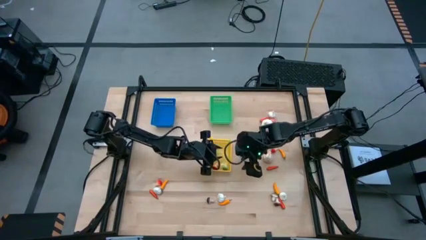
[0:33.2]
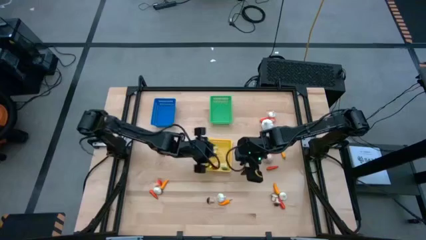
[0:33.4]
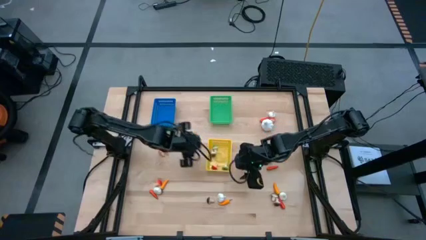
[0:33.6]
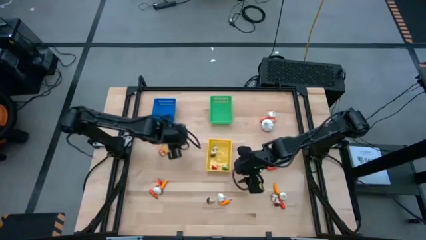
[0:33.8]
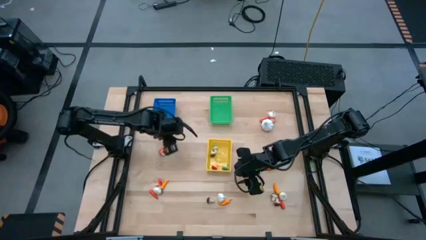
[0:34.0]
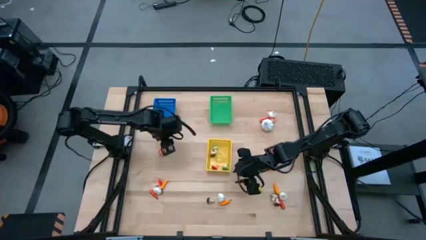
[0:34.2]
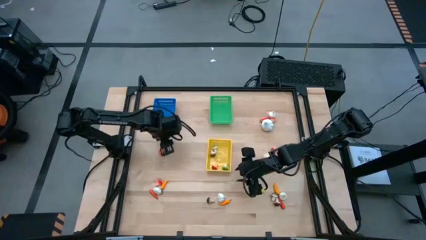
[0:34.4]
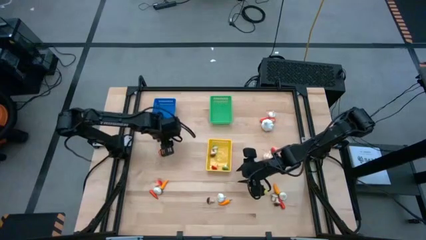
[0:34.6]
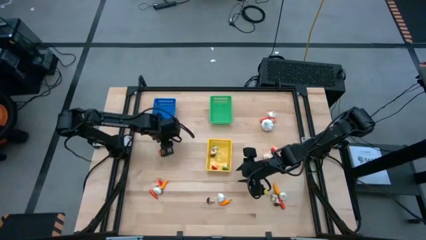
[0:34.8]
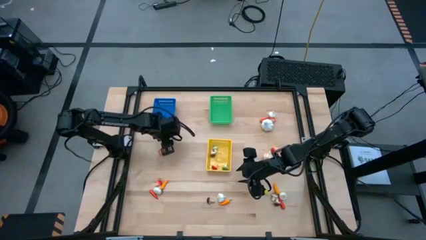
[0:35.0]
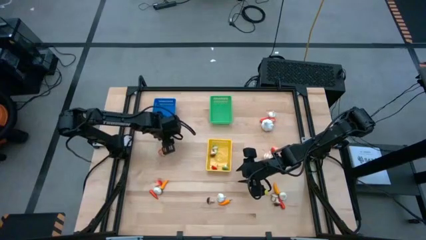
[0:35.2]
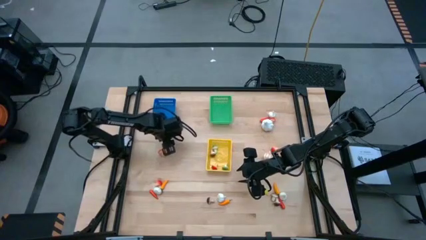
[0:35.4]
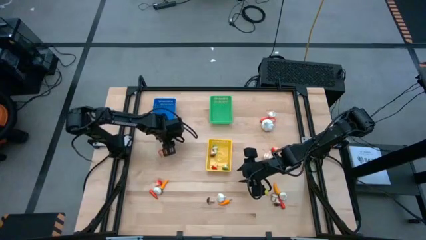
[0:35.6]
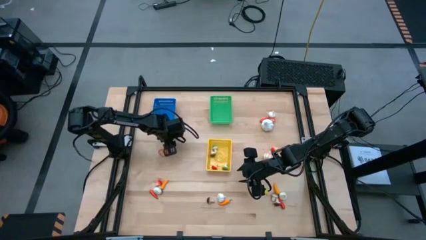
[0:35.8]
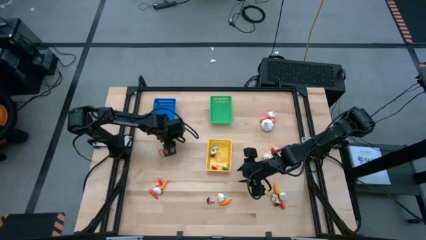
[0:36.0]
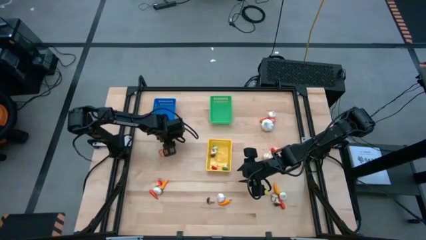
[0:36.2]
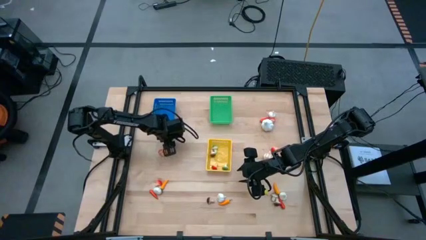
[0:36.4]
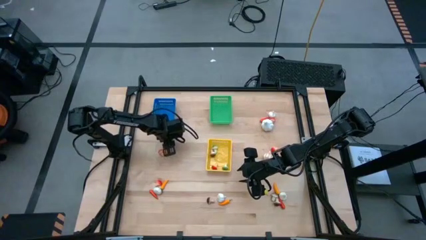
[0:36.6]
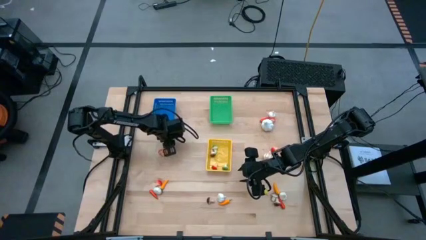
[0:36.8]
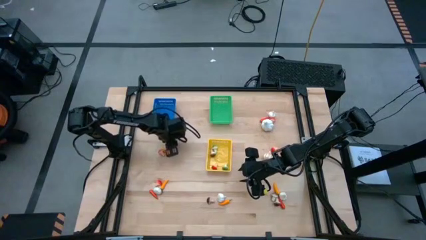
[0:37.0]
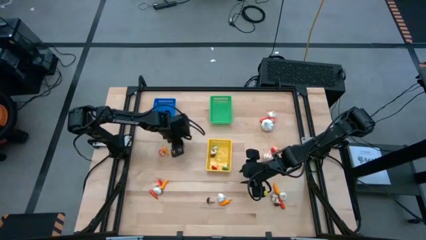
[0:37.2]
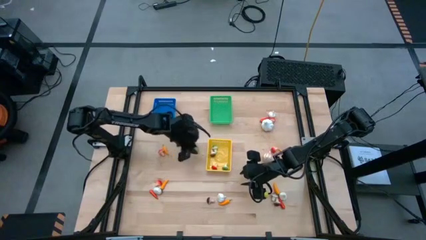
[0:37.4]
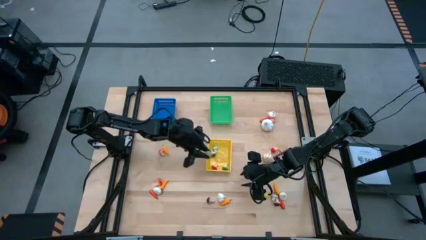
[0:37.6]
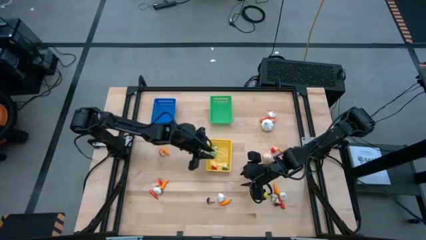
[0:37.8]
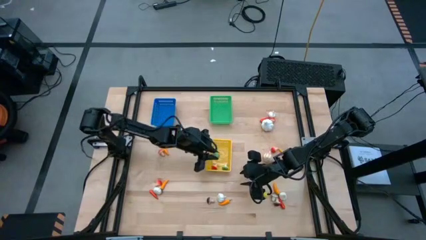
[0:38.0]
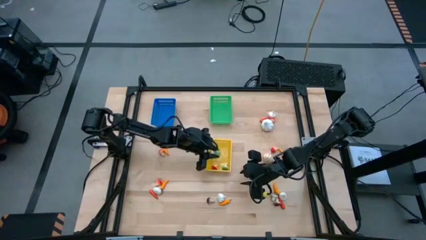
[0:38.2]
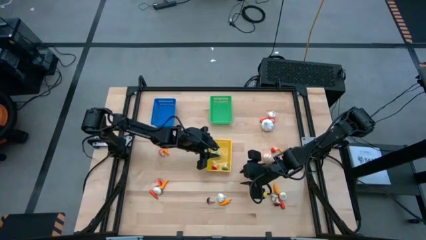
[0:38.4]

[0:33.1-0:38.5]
Task: Sort produce into baskets
Put the green mushroom into the yellow bin

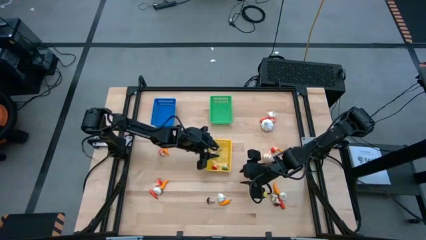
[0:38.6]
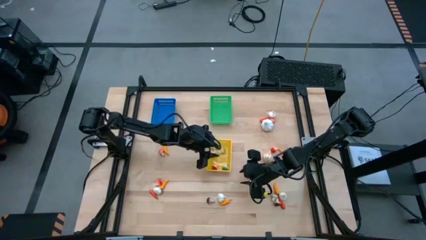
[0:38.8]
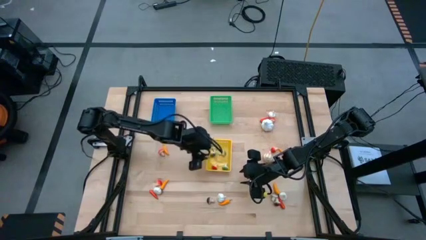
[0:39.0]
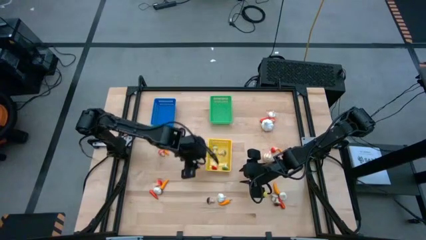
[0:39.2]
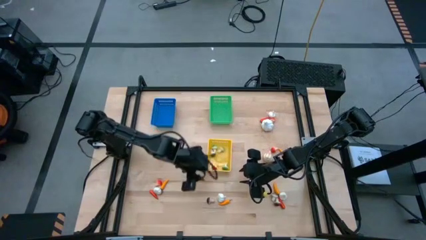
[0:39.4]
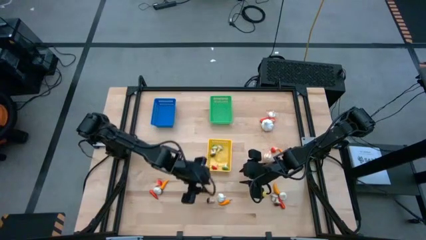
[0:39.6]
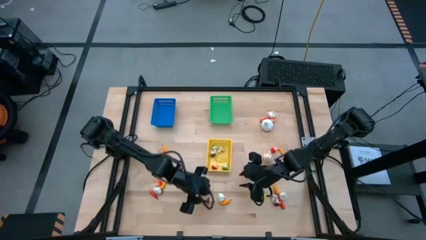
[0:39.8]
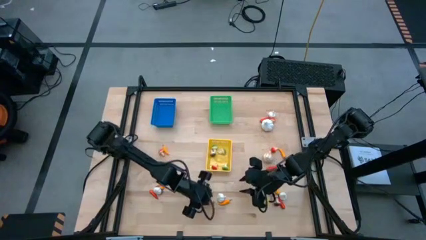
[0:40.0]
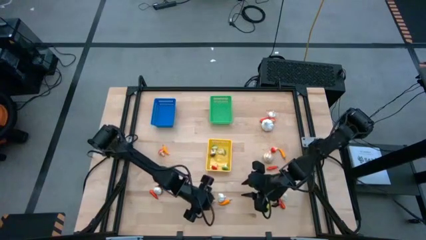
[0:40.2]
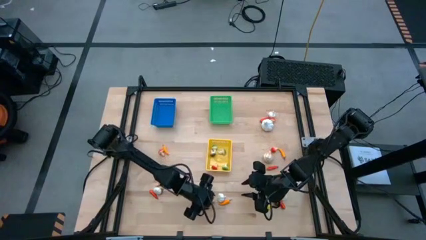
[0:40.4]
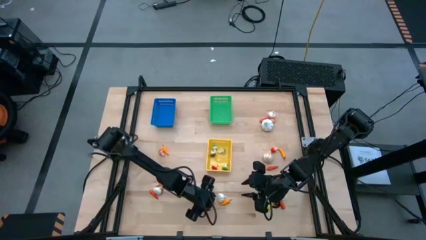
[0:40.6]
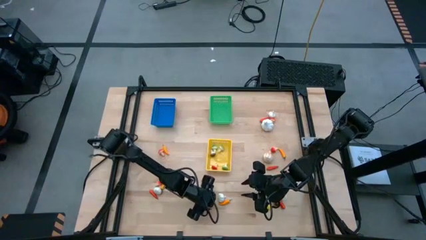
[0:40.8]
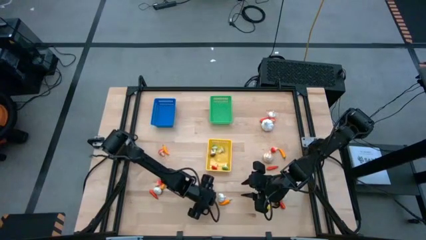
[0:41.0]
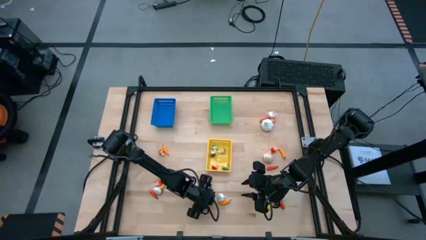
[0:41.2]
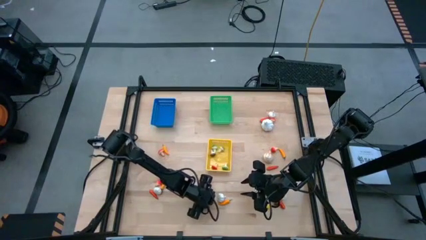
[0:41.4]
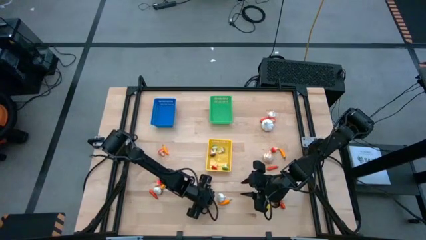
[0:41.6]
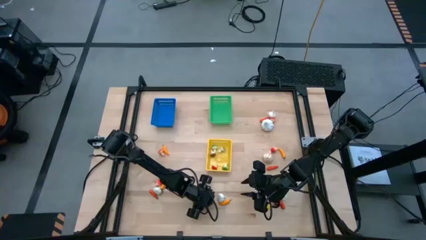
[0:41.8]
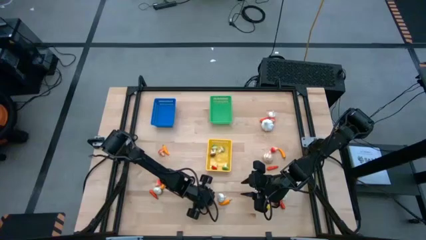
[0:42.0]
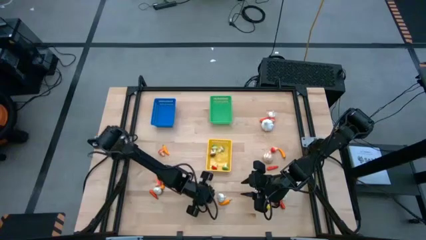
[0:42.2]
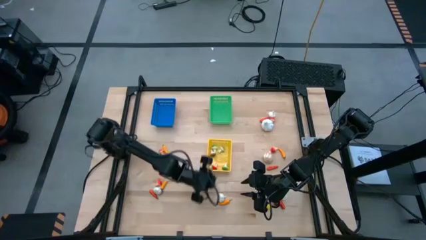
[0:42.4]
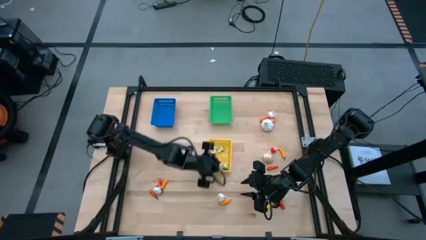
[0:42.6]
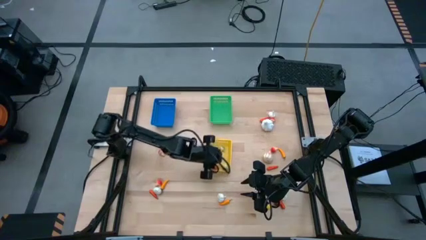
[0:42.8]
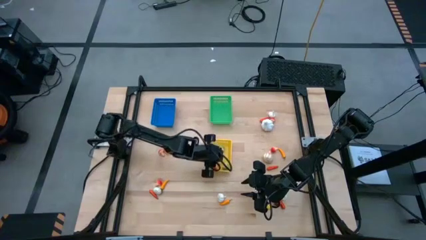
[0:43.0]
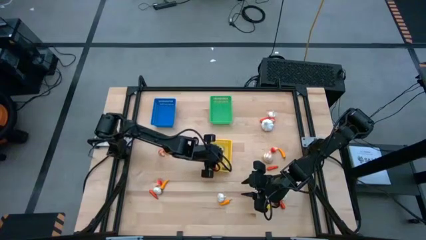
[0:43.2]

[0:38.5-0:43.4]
Put the brown mushroom into the yellow bin

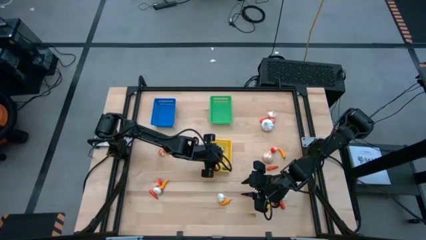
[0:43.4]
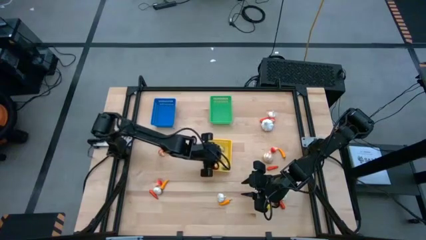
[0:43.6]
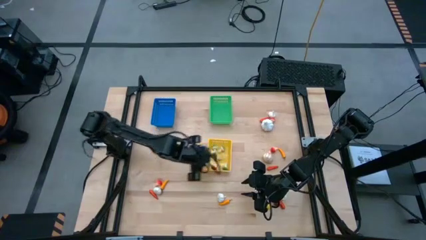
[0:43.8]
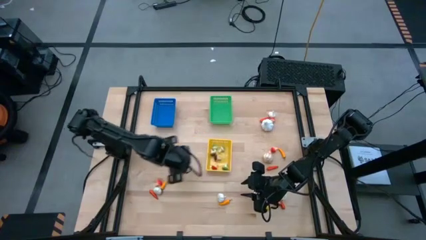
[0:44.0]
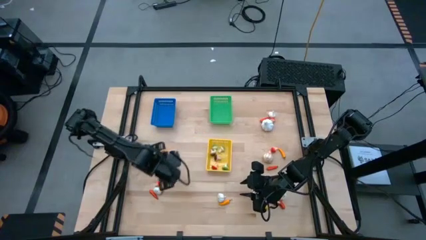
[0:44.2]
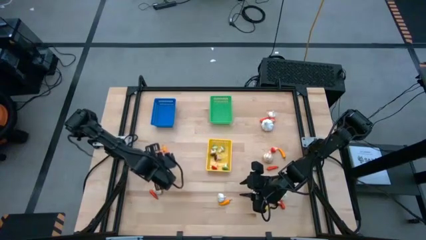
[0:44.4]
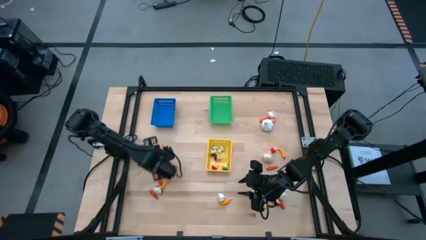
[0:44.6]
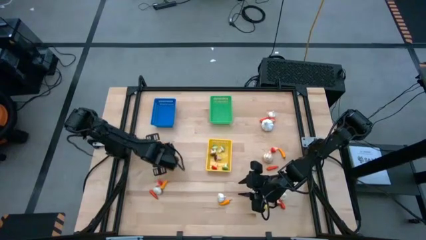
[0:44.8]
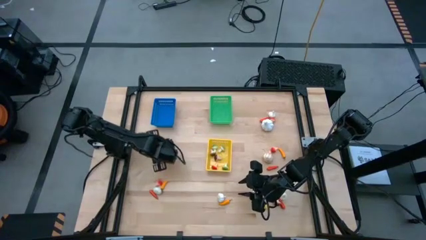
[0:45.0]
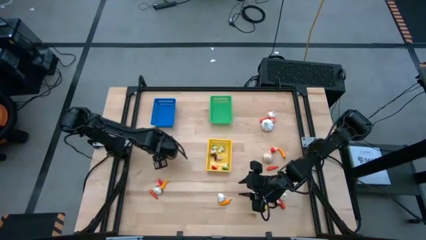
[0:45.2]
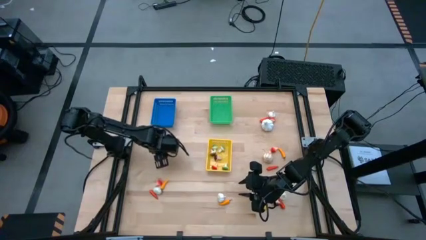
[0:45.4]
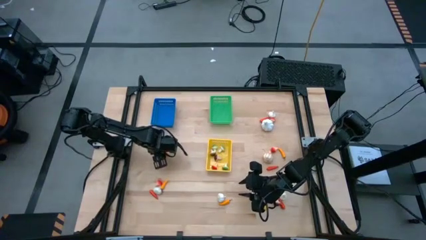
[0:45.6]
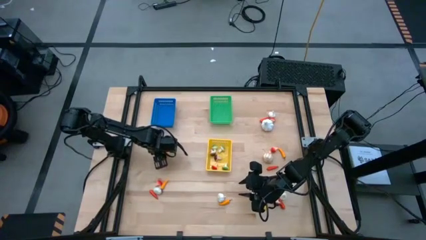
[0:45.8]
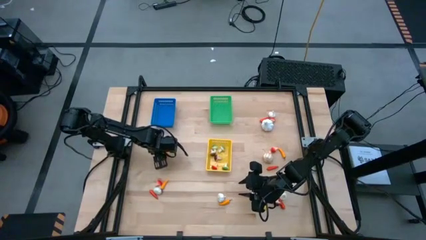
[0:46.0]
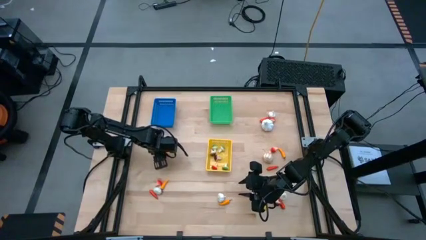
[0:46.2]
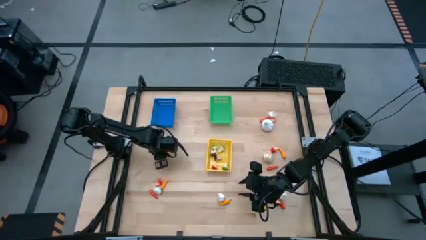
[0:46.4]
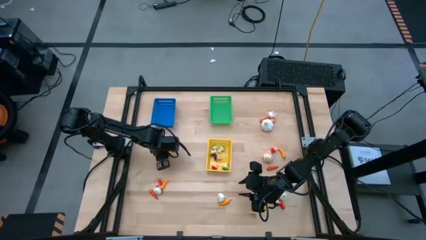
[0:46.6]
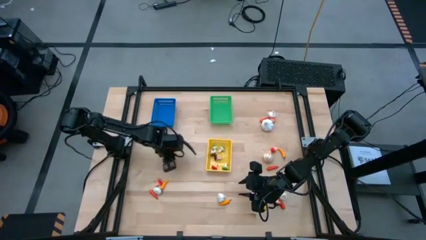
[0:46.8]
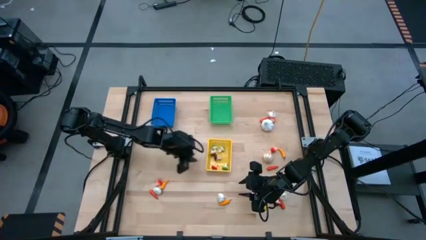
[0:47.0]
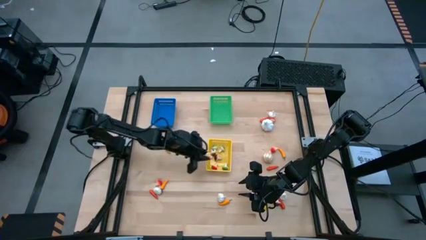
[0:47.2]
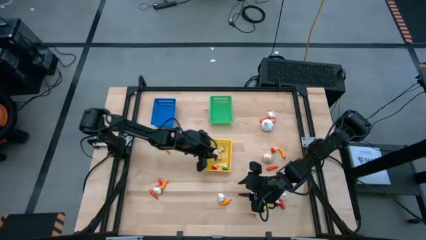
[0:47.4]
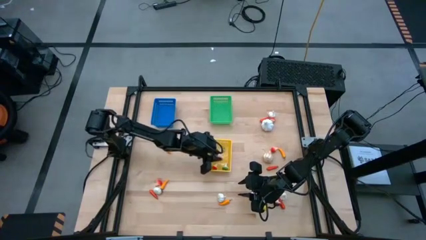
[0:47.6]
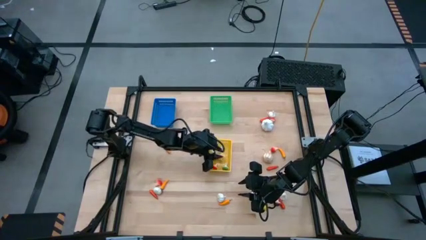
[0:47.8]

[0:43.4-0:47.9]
Put the red mushroom into the yellow bin

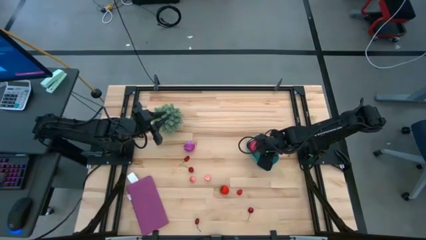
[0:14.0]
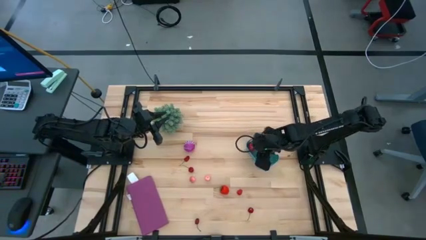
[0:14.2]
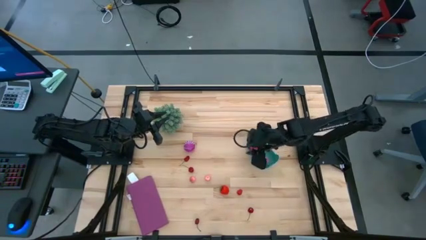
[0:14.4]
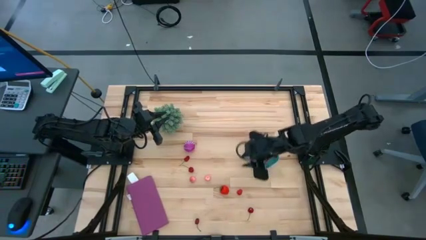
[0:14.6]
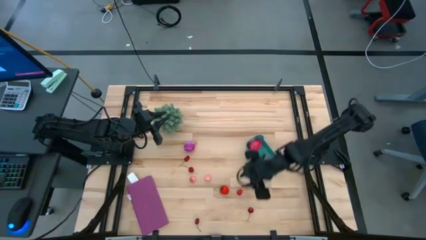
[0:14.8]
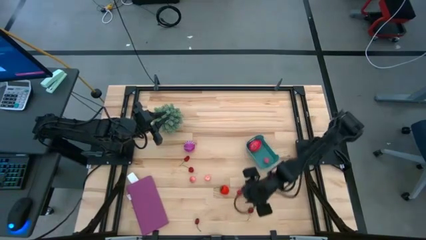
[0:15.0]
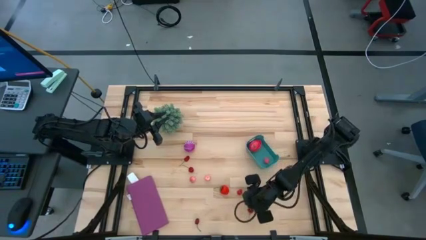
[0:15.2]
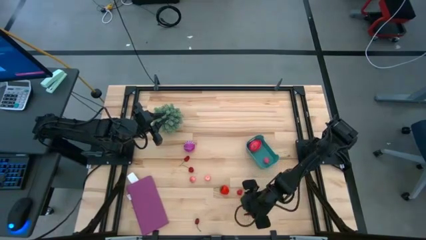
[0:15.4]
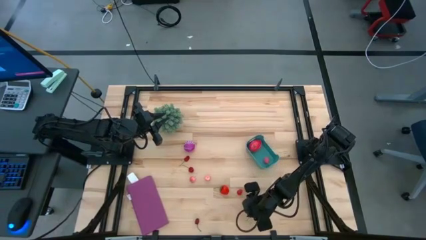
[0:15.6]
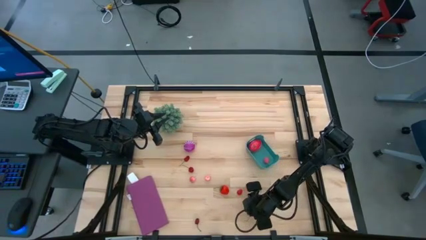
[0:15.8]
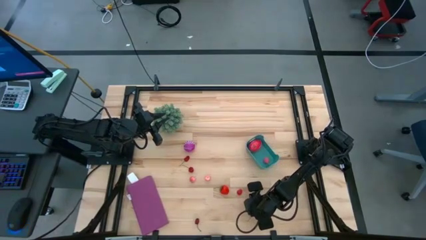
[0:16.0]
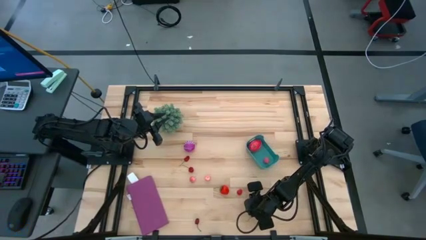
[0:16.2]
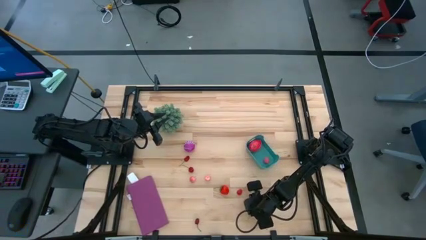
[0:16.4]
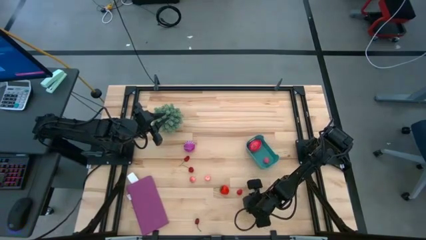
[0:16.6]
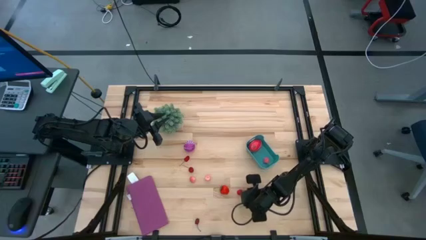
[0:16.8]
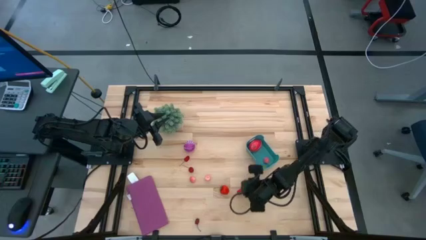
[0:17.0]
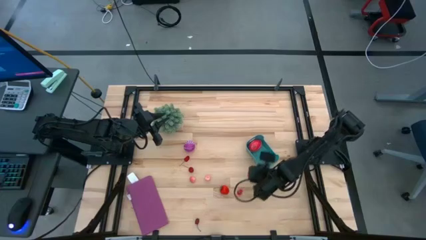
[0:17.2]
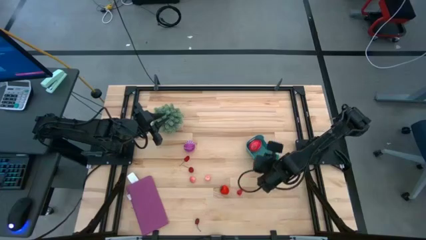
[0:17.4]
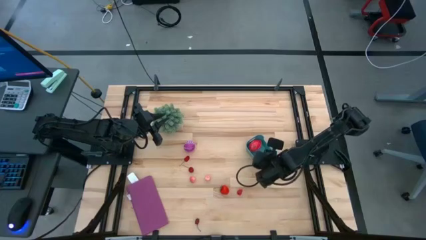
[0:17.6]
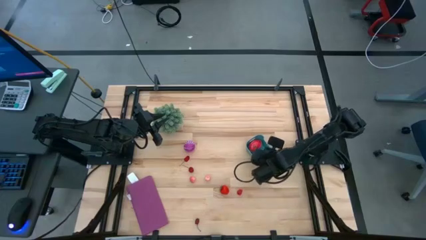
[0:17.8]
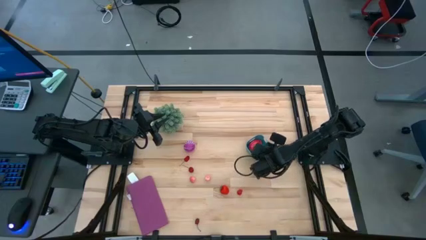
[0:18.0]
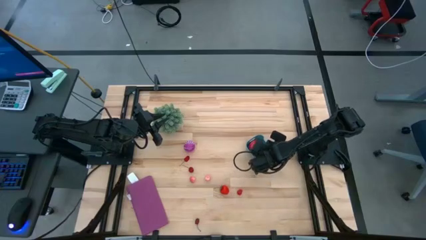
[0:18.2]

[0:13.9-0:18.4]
Task: Pick and placing Produce into tupperware
Put the cherry in the basket
